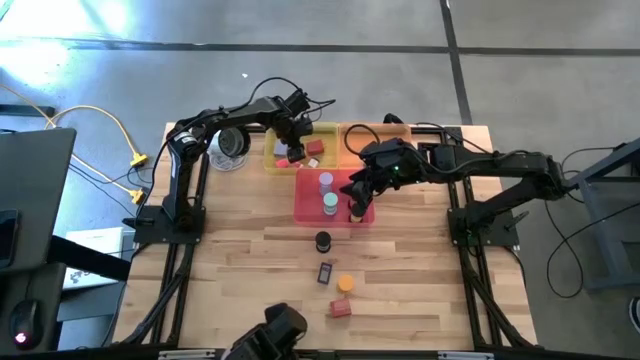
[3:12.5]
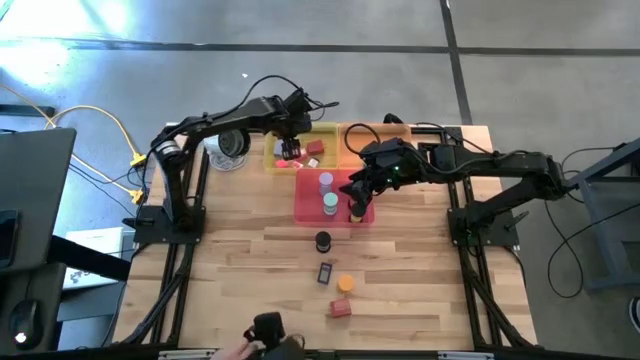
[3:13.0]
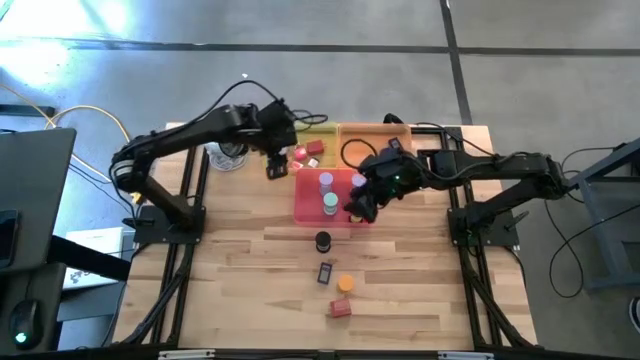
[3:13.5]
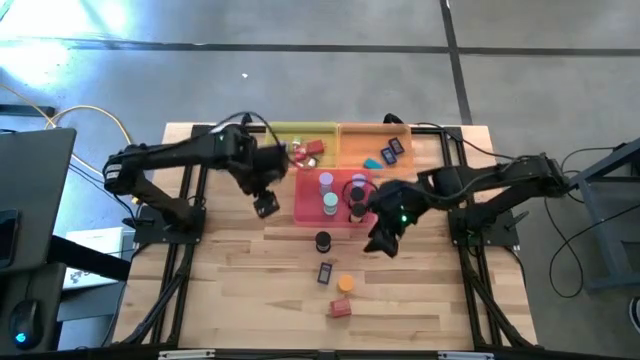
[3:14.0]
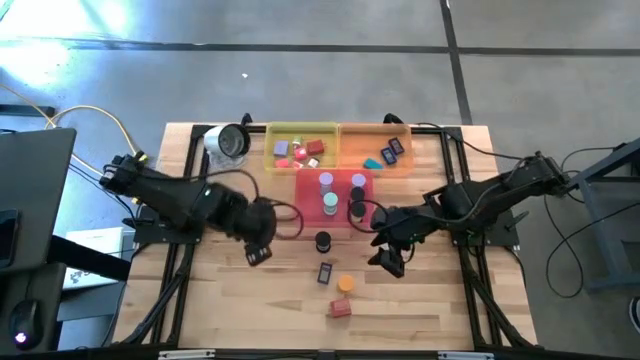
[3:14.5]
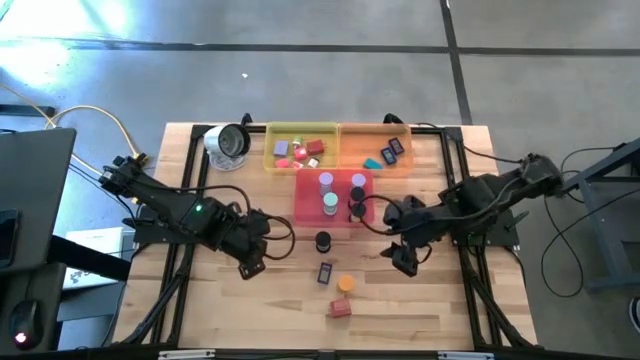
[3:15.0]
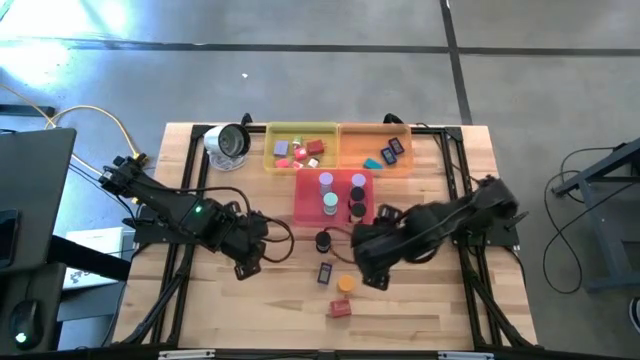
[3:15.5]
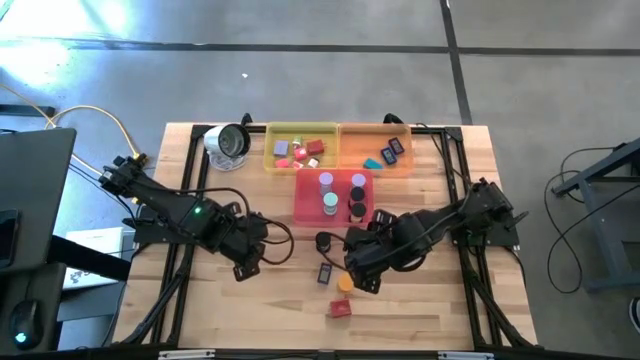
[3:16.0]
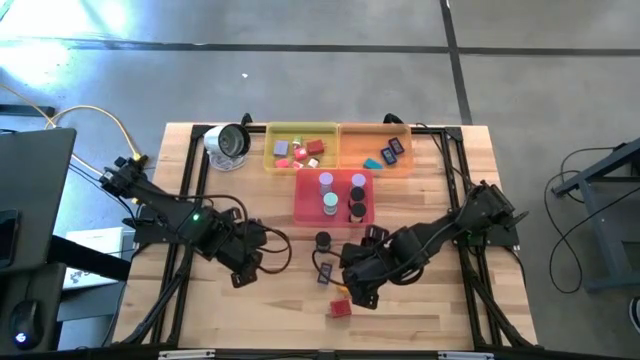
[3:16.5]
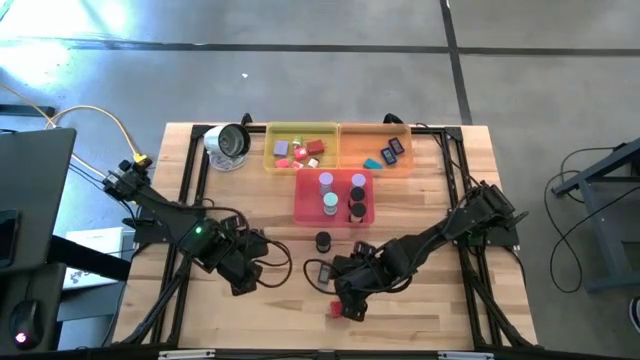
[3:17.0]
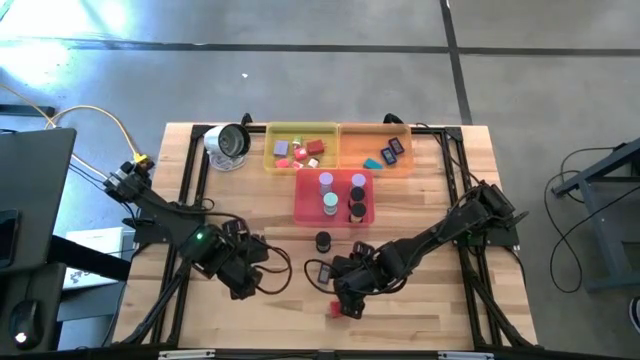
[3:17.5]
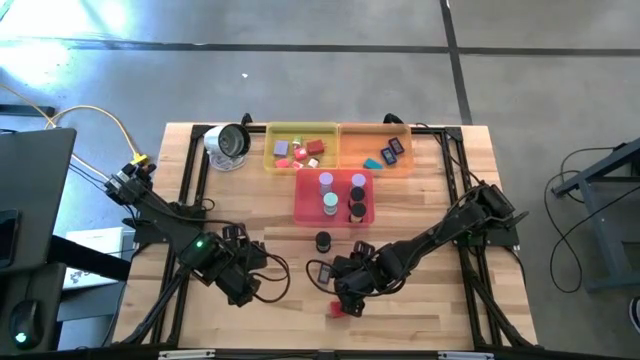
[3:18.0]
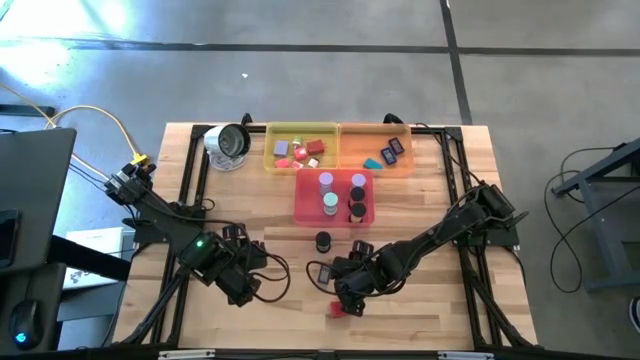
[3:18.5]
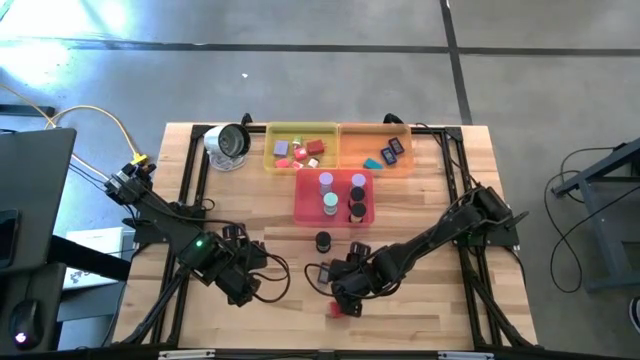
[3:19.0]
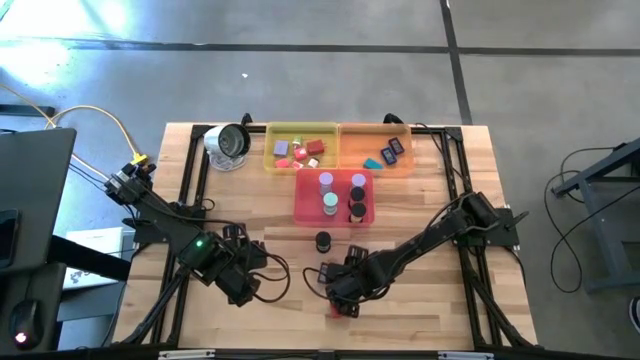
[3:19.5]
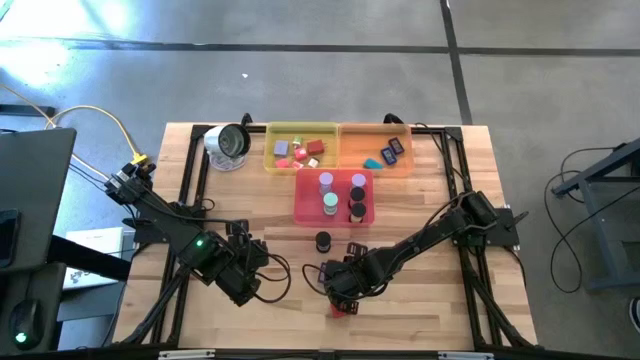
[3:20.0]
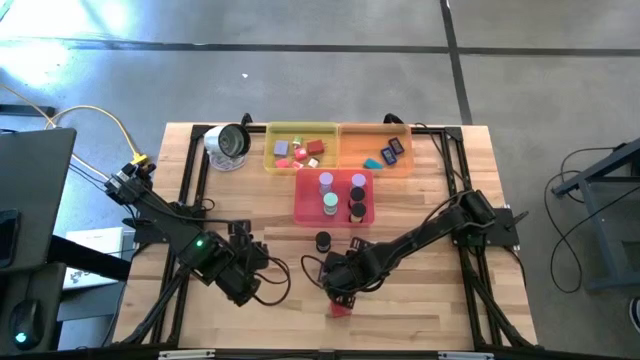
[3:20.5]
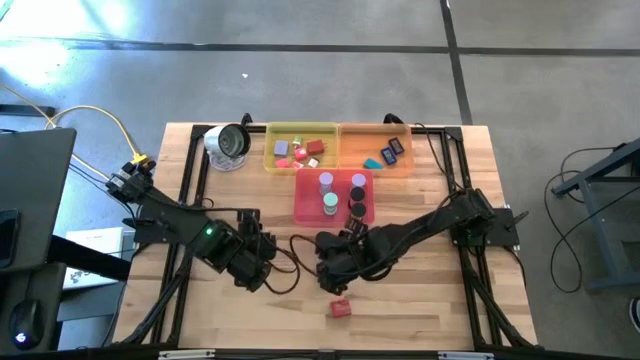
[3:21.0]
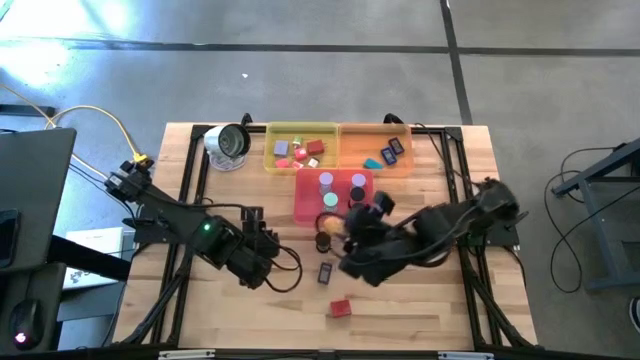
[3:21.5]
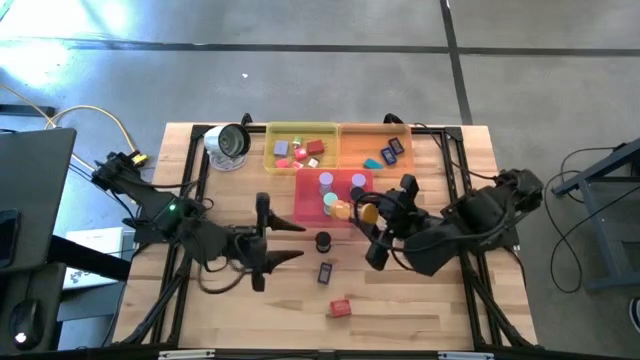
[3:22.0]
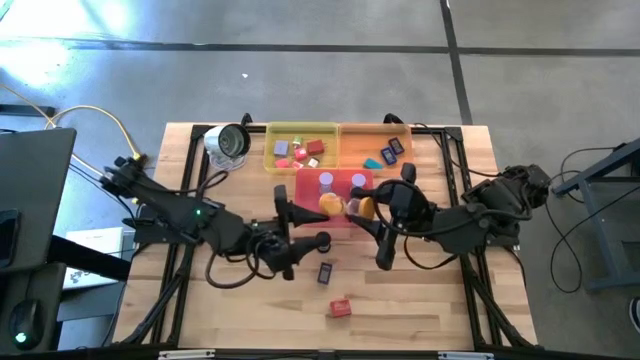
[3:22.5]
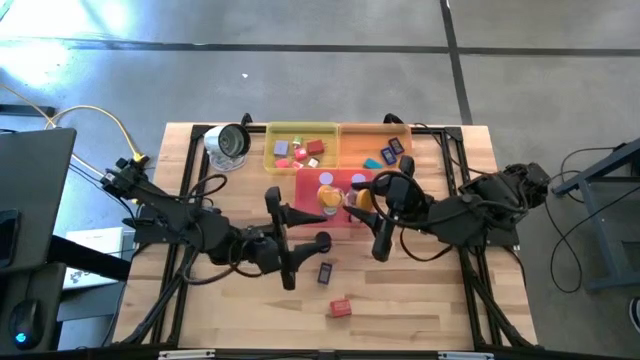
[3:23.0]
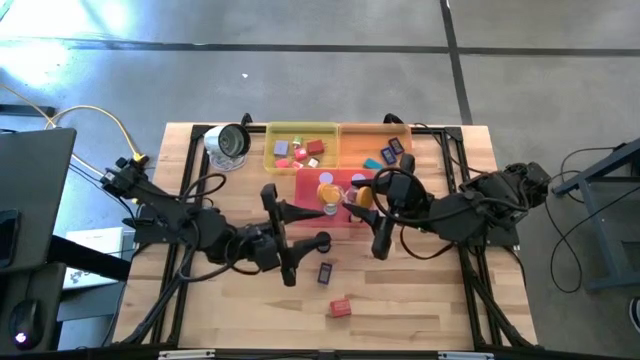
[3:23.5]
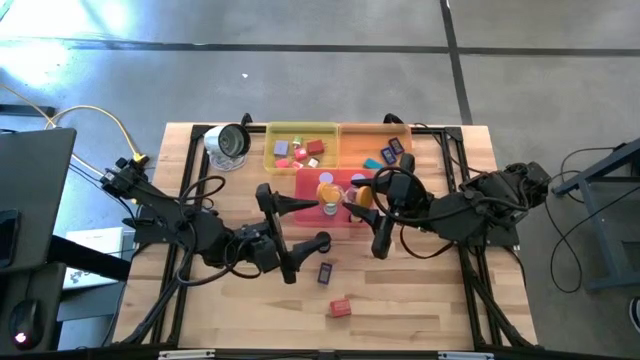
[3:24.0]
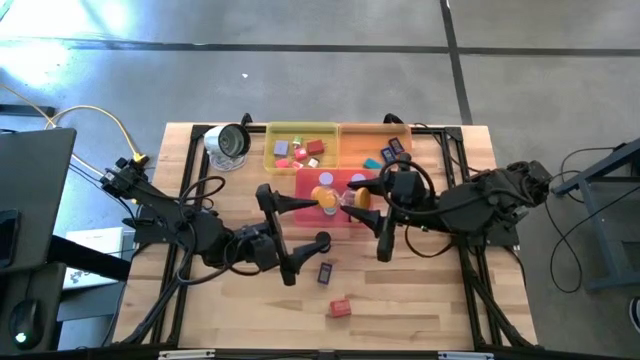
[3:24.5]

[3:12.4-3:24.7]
Task: Pick & Place Office items
Put the yellow hourglass into the red bin

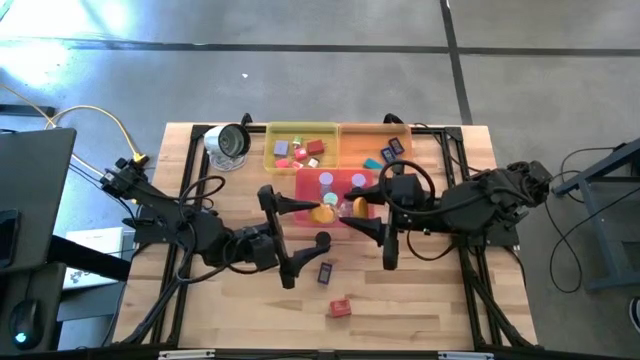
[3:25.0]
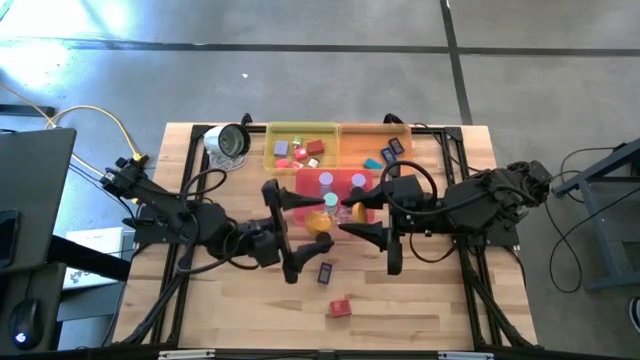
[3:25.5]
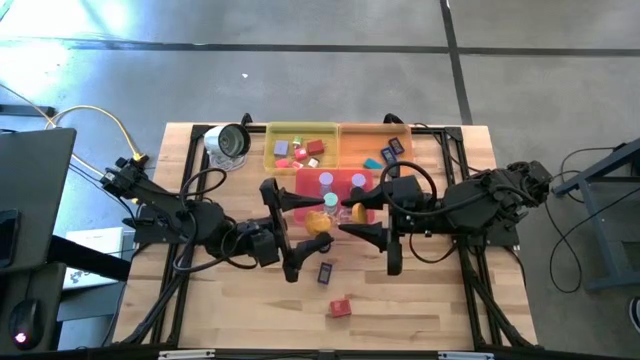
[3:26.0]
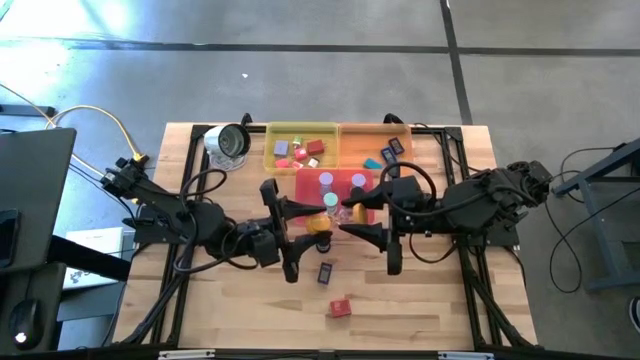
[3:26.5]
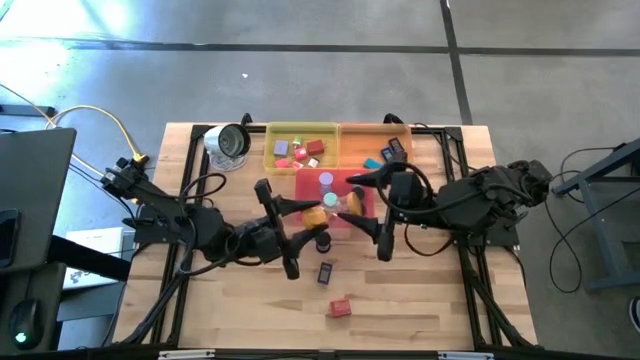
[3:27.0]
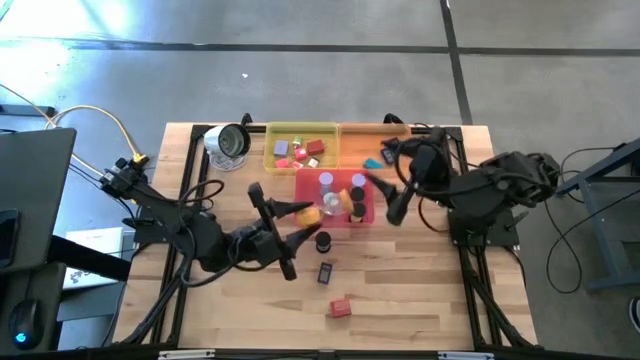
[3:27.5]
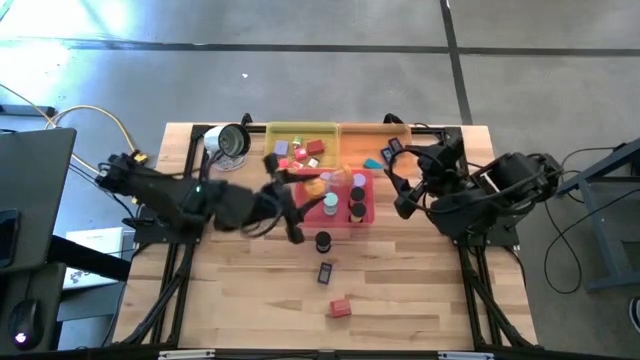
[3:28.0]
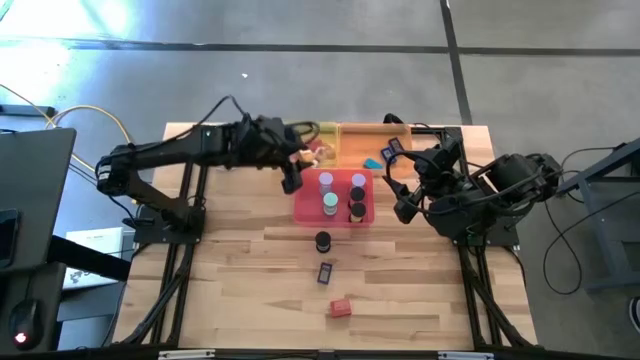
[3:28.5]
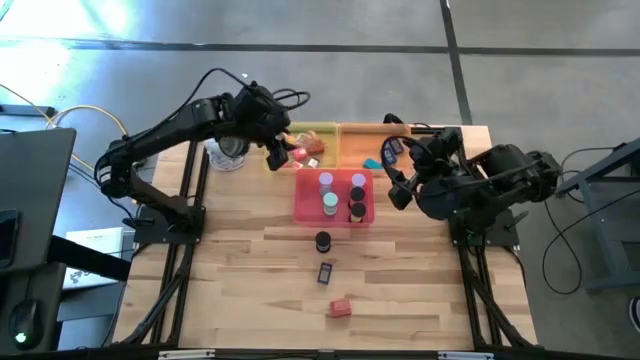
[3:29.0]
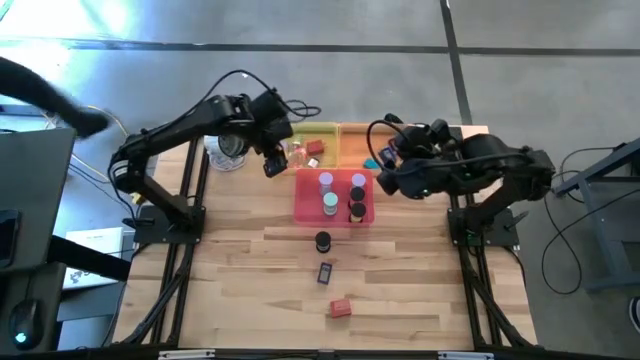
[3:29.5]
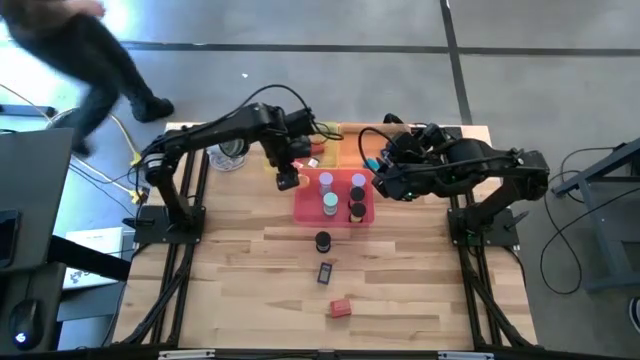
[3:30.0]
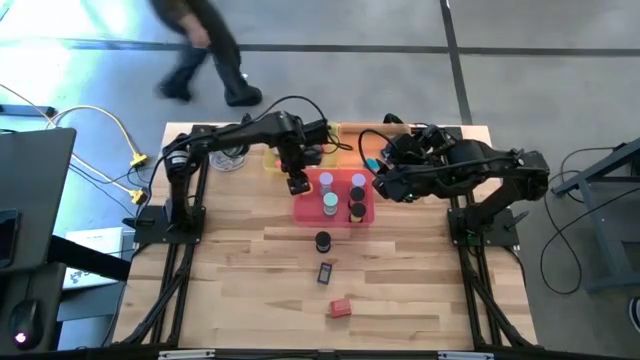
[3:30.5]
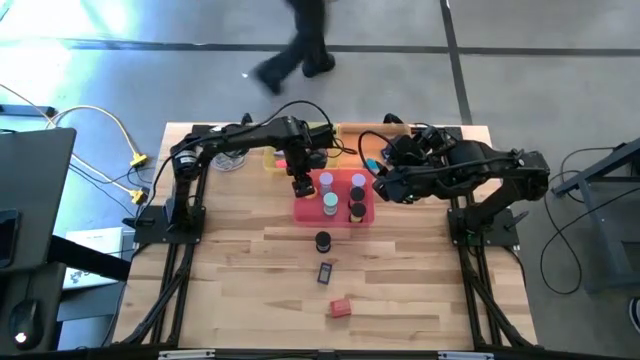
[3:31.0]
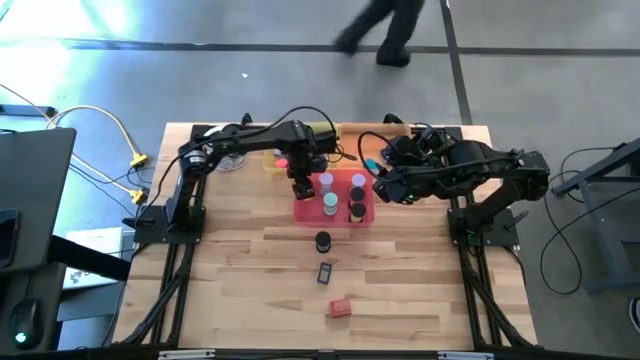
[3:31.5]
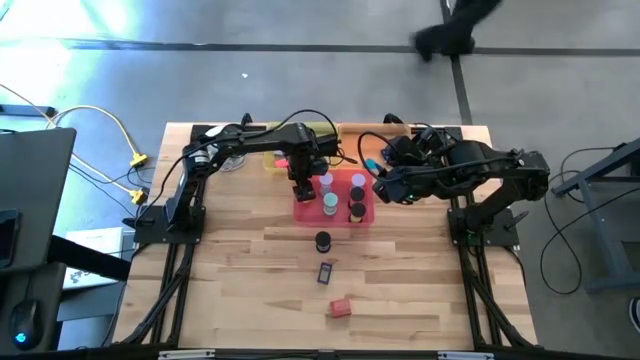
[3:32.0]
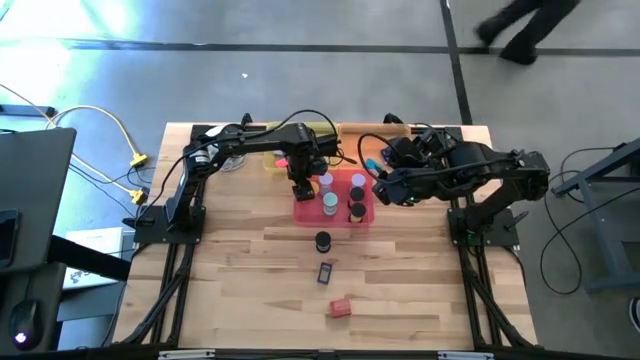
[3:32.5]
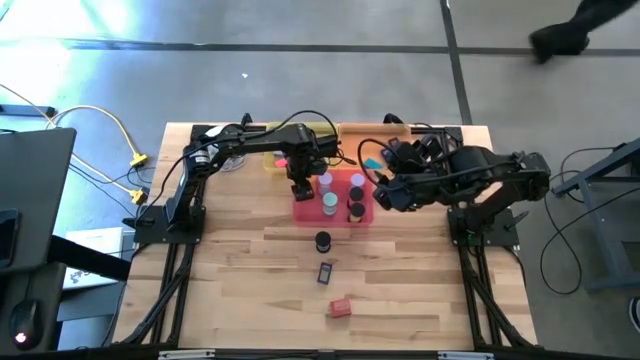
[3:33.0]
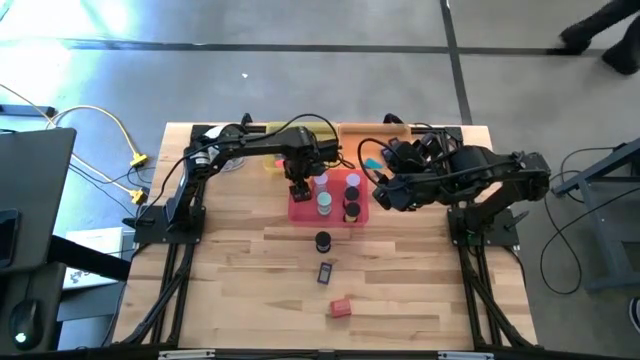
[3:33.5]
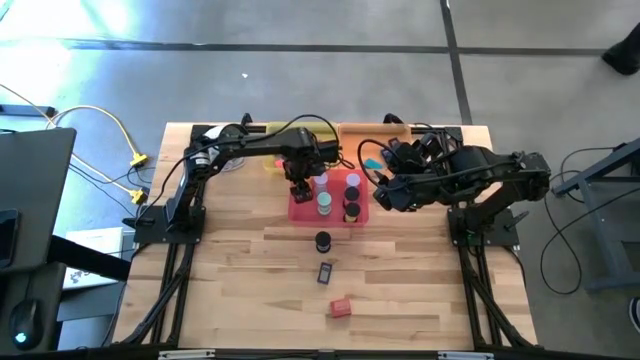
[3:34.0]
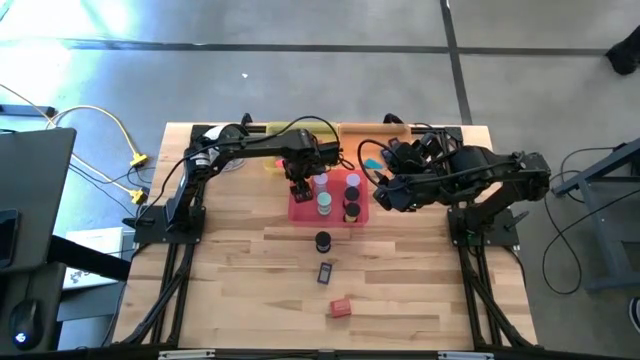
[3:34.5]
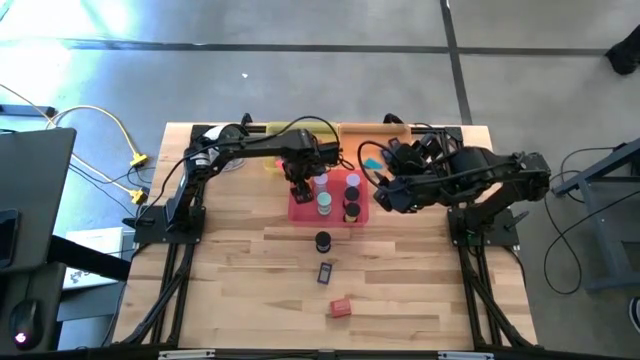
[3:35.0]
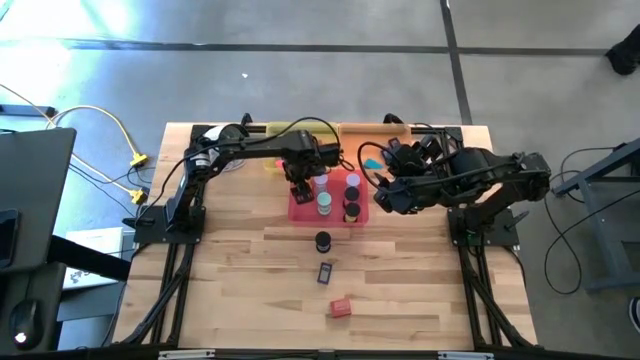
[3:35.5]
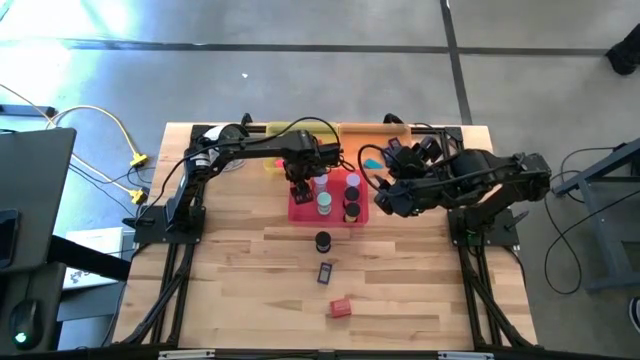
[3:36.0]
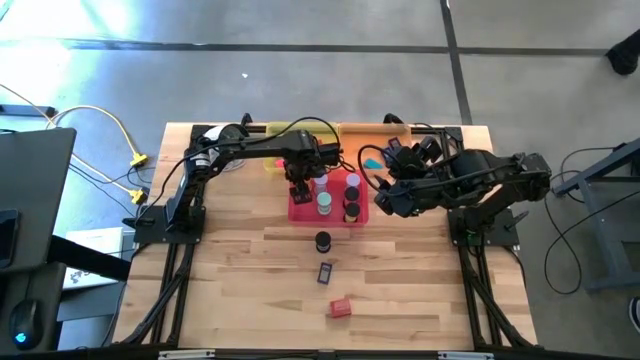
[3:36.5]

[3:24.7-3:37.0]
Put the yellow hourglass into the red bin
